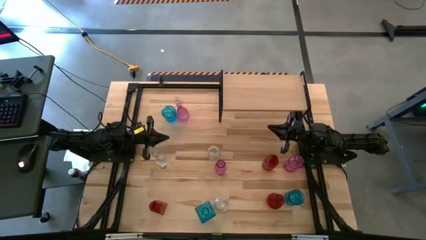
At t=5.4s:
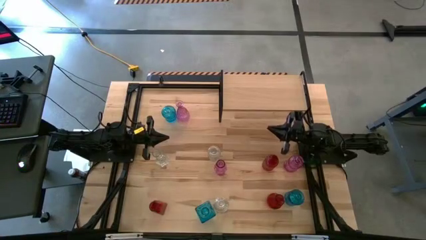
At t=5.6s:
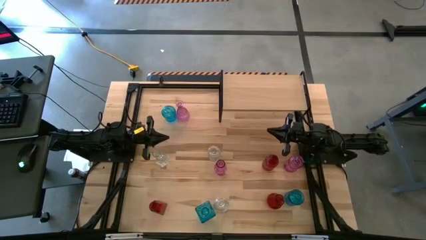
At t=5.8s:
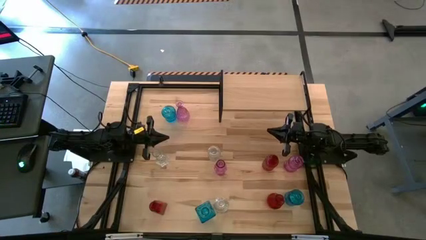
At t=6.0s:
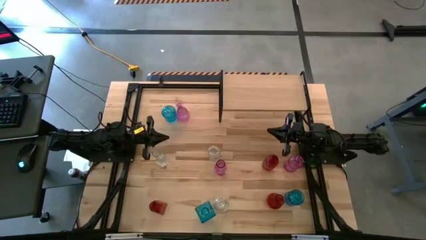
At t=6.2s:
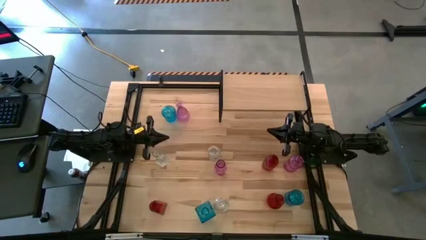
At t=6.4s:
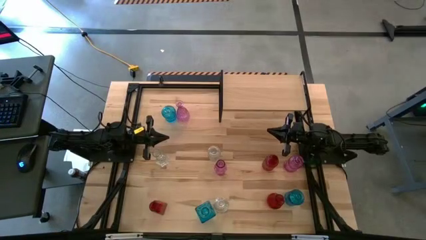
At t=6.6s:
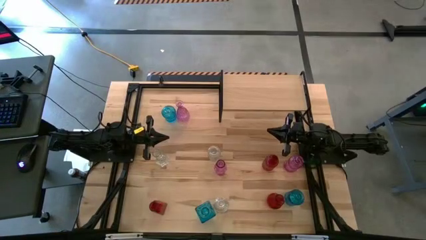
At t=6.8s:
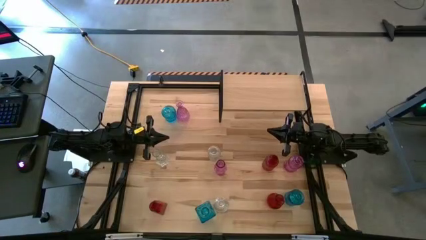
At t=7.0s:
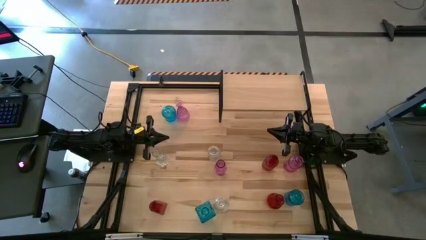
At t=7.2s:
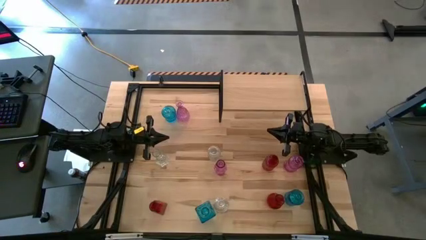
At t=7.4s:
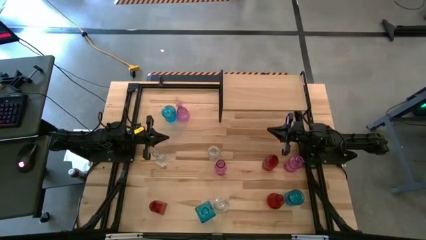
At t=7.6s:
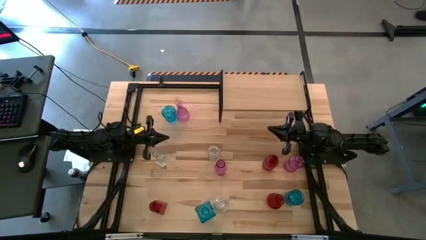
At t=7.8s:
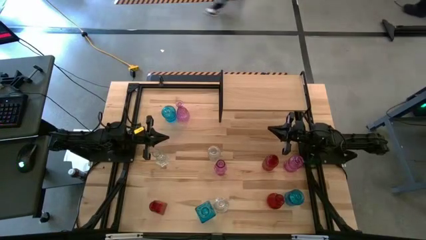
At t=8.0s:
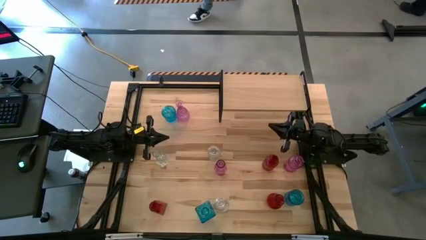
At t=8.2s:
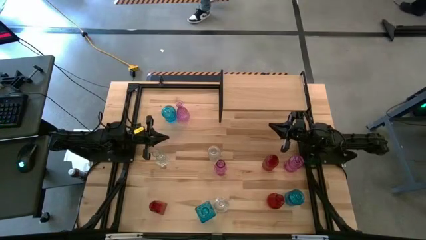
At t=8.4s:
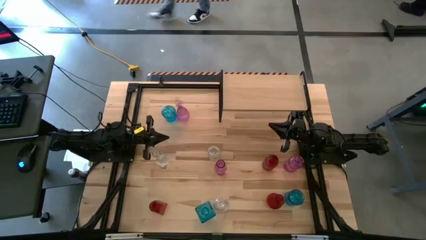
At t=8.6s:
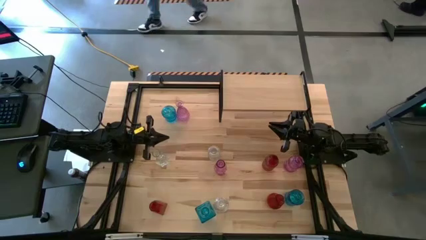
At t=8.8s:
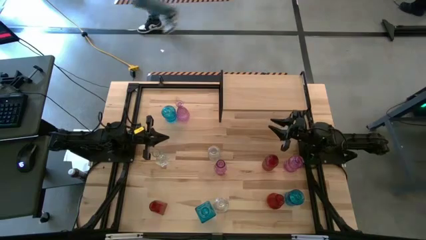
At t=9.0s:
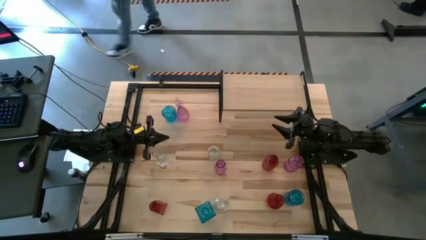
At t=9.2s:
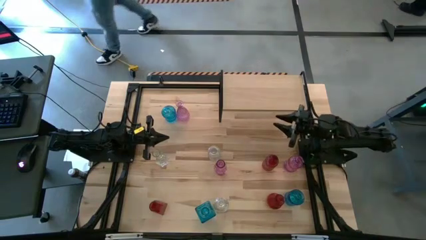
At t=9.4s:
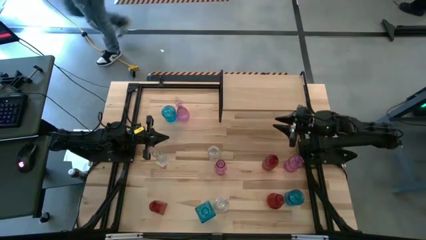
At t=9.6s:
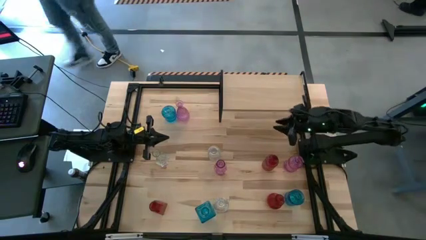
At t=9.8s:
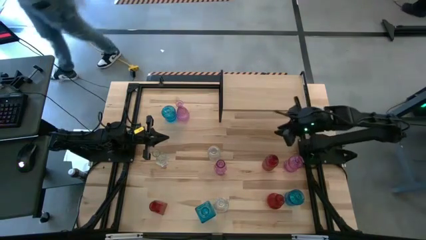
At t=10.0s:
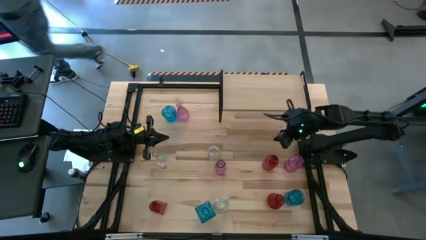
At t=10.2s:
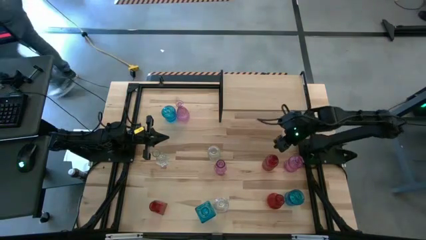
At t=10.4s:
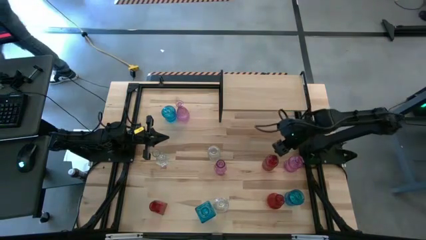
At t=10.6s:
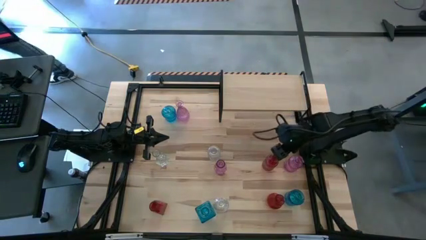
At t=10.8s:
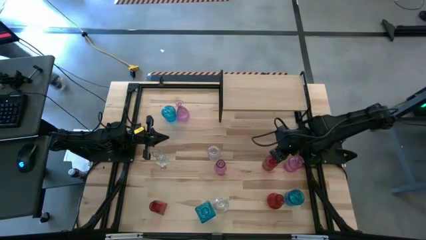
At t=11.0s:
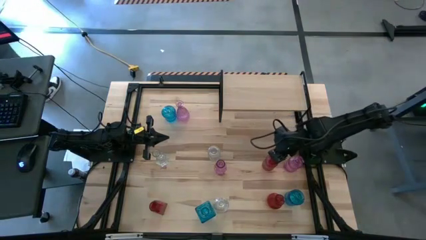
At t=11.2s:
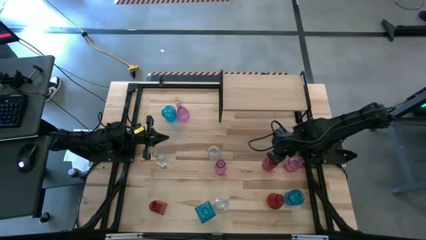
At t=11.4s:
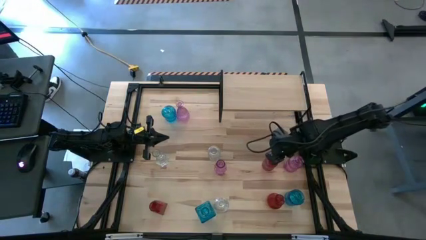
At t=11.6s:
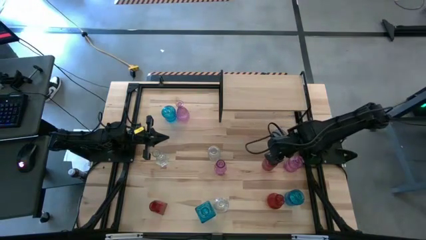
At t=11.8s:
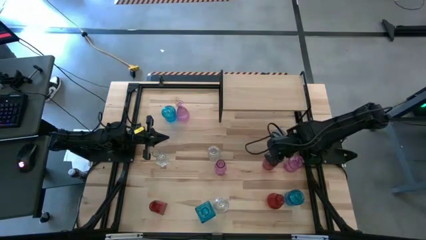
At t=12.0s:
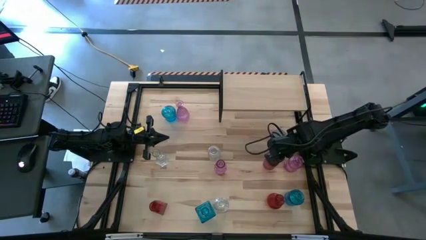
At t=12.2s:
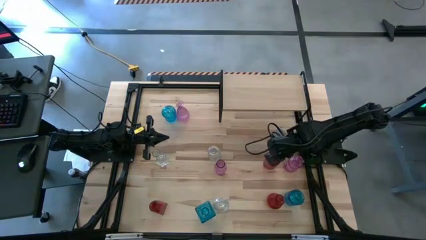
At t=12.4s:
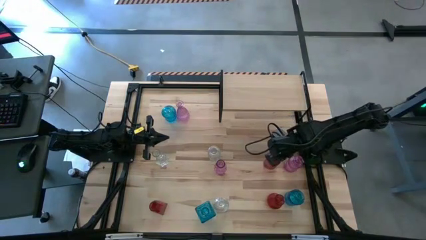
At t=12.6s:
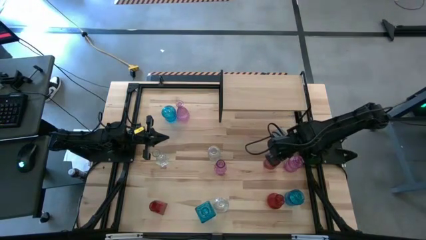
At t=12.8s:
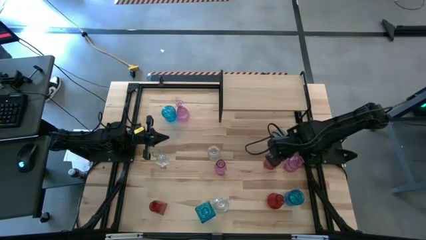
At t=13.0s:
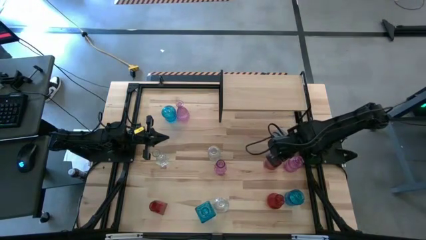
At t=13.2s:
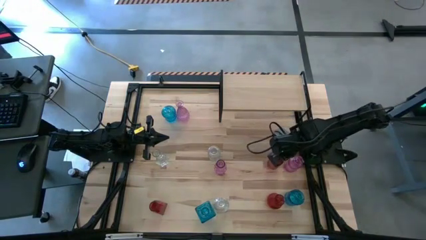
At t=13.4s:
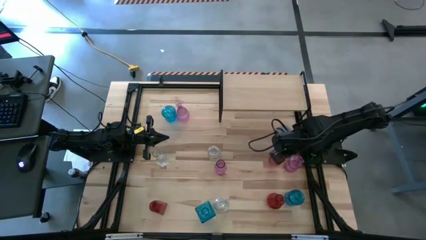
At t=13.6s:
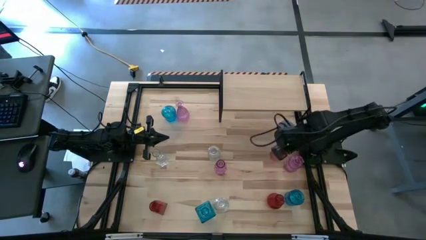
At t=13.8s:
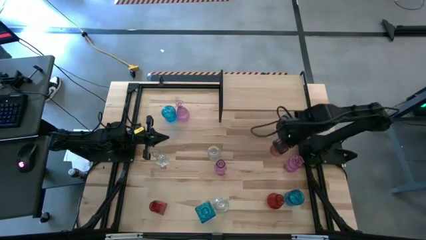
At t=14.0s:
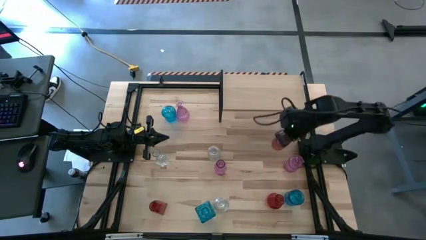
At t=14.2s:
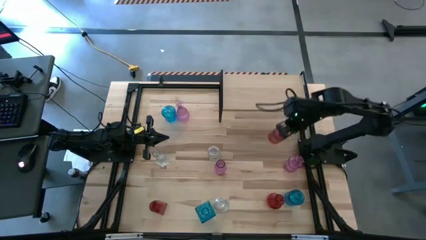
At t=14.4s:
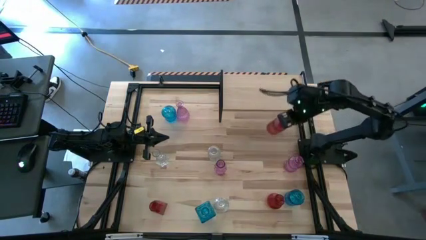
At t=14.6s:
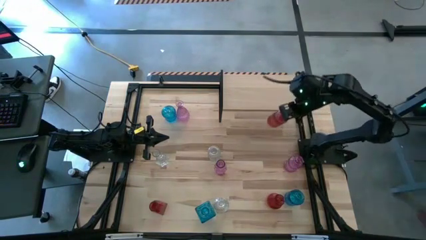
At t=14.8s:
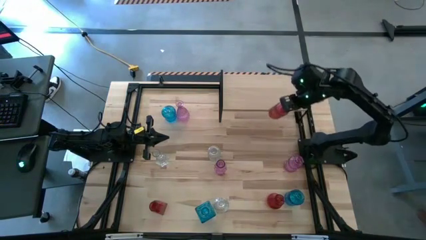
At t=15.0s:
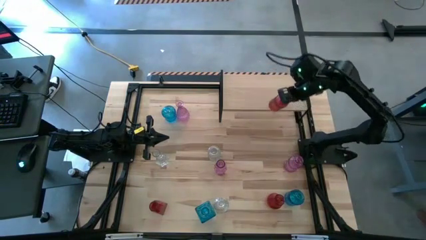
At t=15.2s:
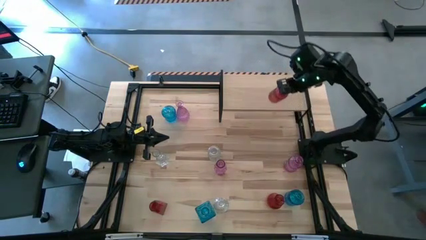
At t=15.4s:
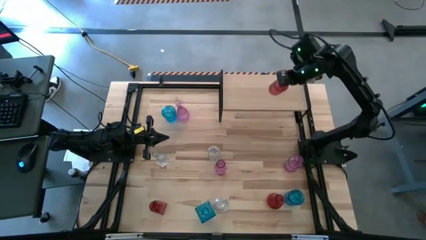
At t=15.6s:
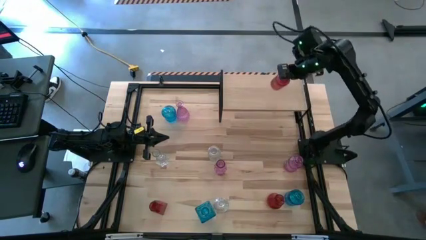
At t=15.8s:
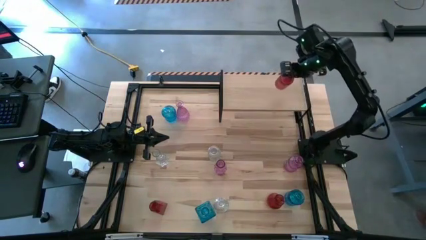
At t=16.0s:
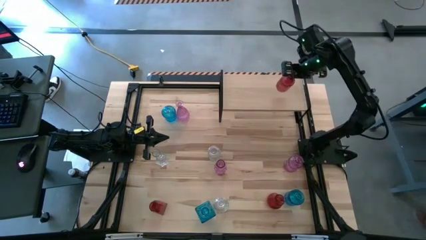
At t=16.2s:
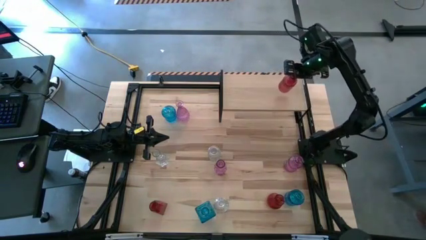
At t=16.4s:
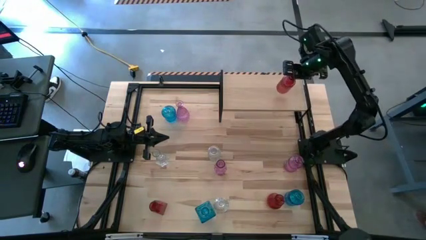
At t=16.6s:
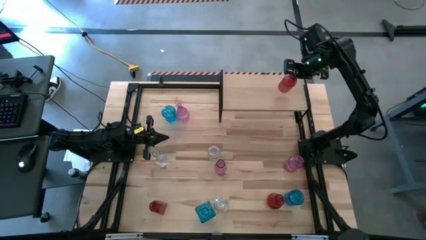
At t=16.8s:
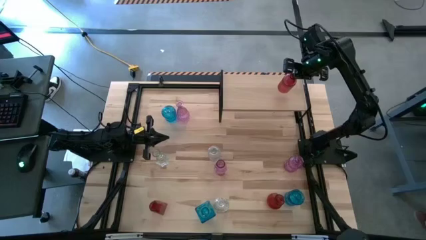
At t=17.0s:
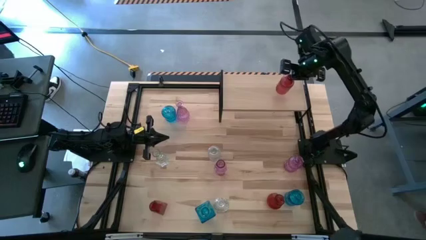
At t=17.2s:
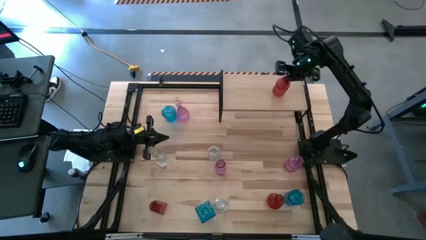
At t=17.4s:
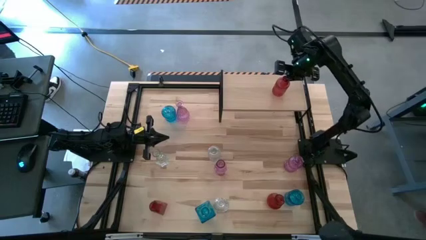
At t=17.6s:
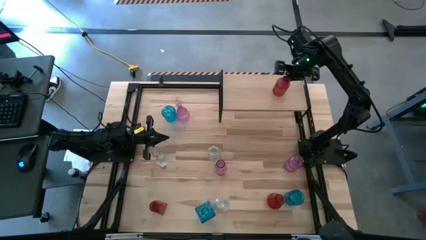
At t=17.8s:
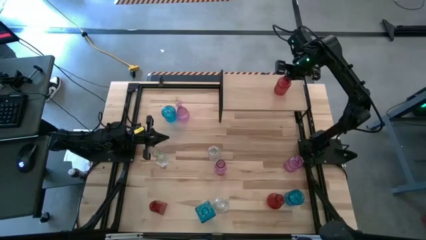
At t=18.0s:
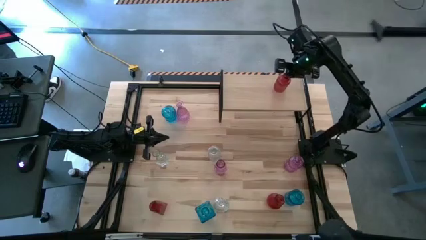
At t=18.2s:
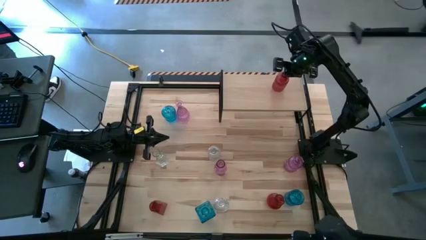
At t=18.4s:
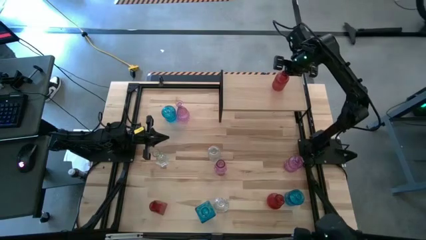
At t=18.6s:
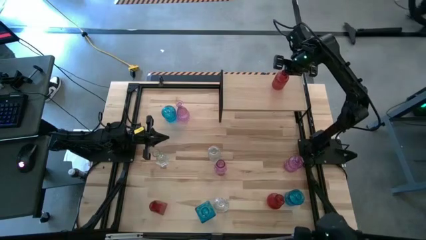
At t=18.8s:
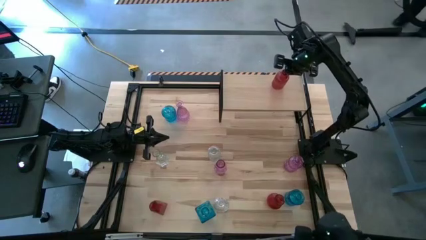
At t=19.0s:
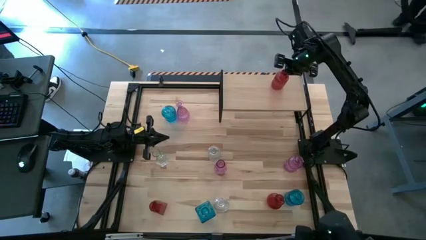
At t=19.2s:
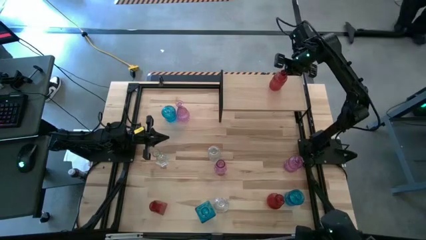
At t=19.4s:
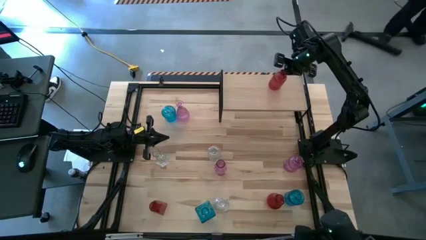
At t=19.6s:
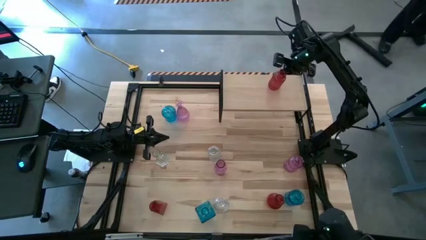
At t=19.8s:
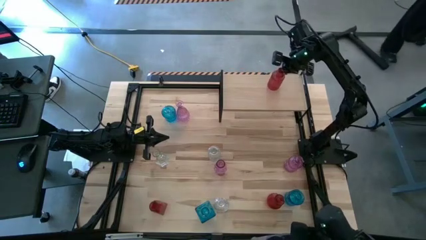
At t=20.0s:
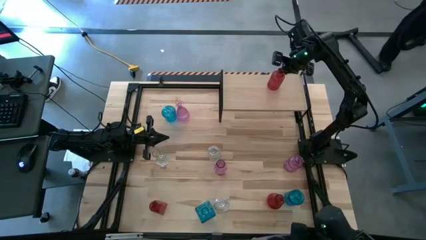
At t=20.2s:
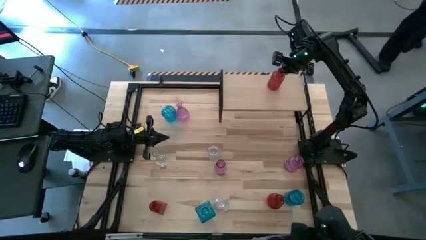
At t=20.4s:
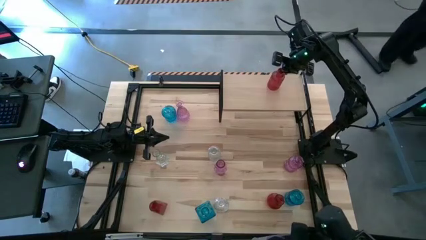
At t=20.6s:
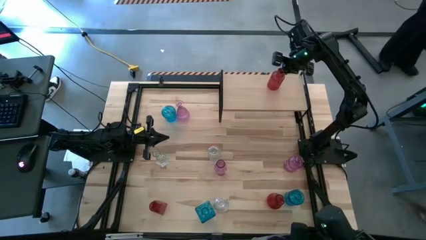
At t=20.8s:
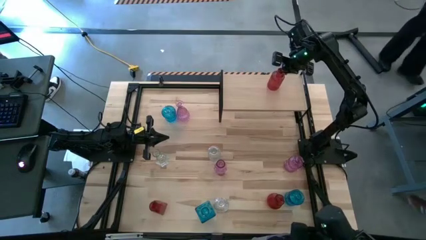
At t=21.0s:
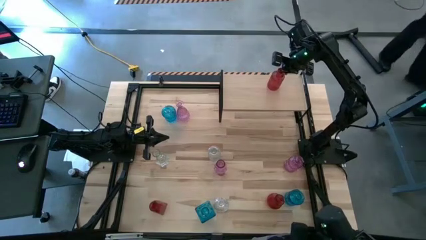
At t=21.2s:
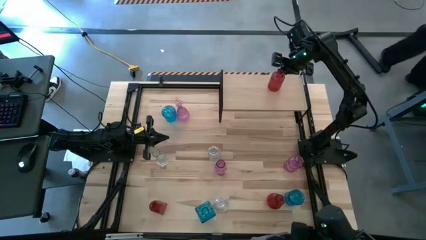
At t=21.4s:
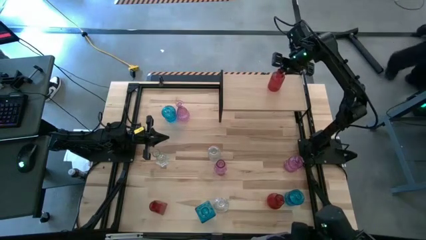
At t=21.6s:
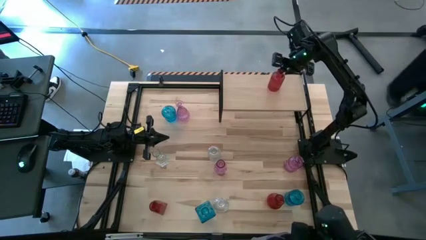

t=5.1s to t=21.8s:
Task: sort vases onto shelf
Put the top right red vase on the shelf
